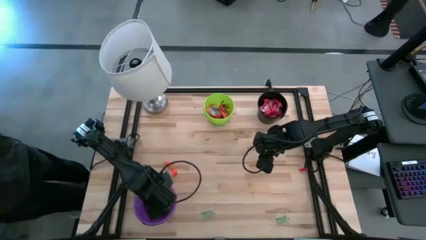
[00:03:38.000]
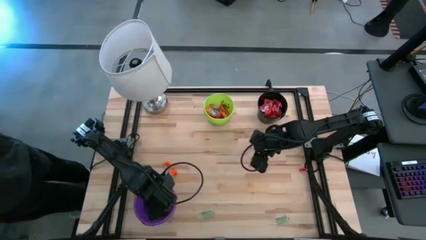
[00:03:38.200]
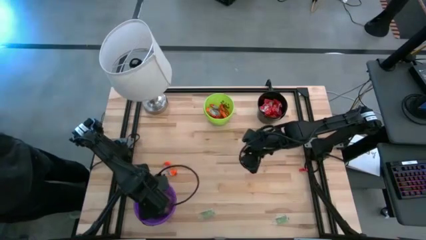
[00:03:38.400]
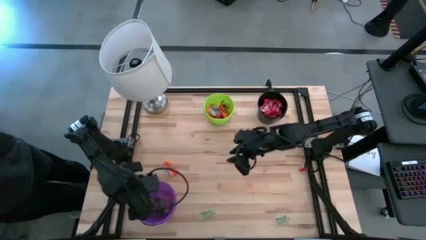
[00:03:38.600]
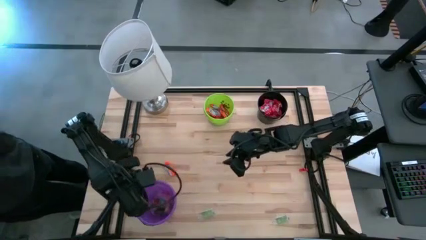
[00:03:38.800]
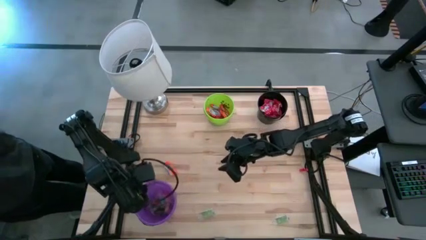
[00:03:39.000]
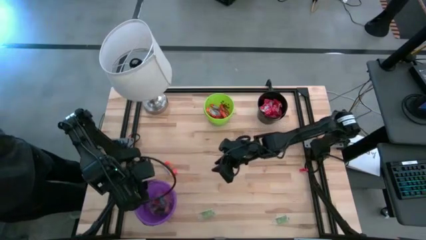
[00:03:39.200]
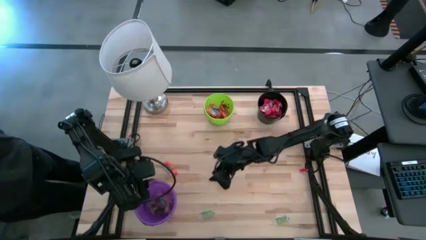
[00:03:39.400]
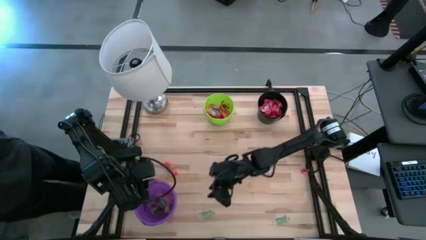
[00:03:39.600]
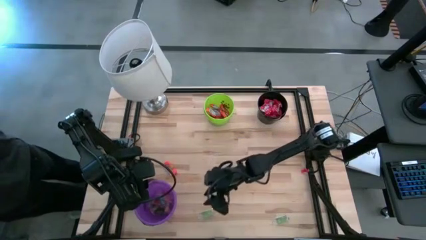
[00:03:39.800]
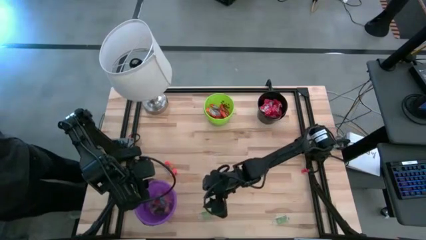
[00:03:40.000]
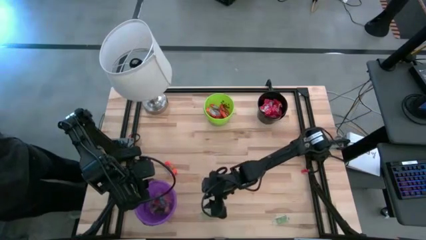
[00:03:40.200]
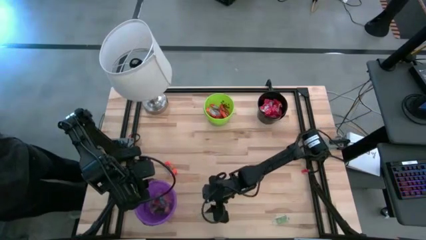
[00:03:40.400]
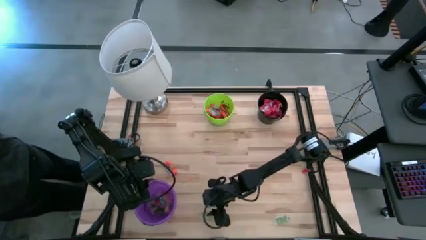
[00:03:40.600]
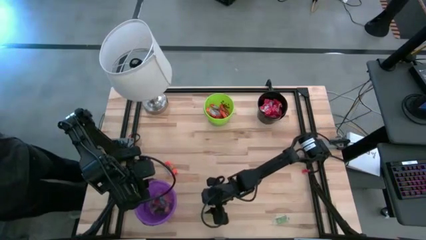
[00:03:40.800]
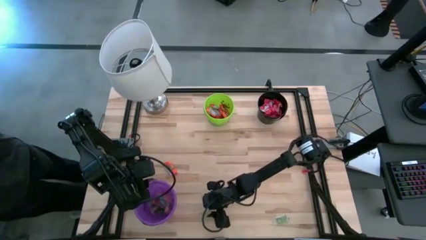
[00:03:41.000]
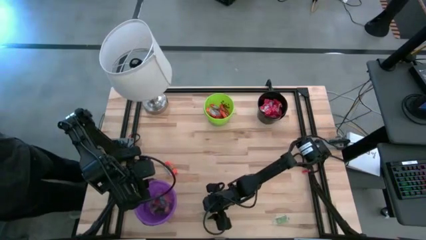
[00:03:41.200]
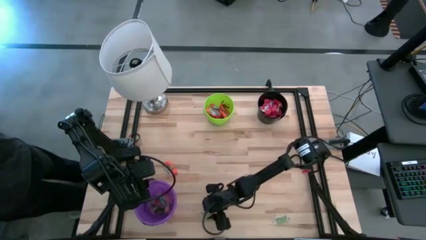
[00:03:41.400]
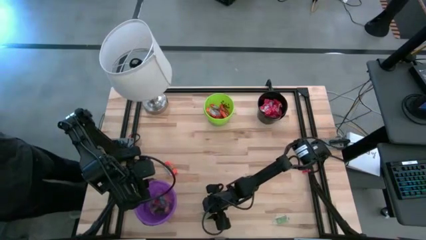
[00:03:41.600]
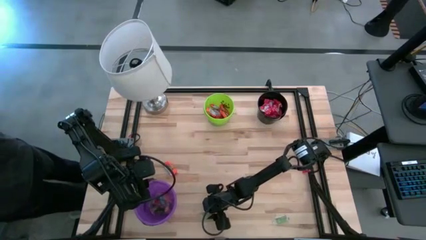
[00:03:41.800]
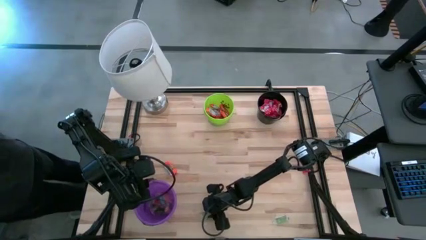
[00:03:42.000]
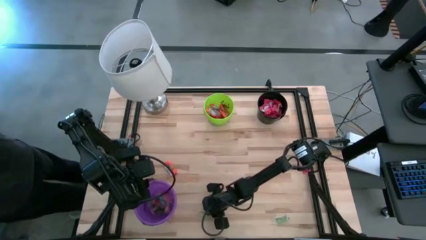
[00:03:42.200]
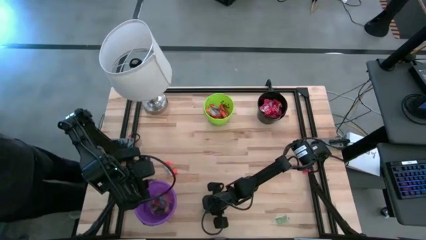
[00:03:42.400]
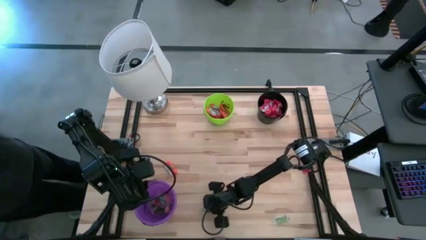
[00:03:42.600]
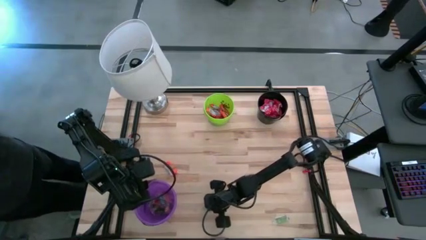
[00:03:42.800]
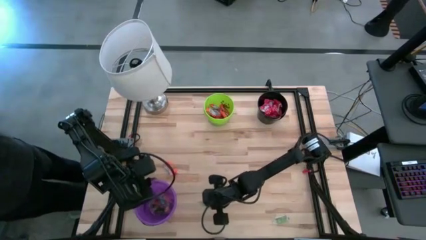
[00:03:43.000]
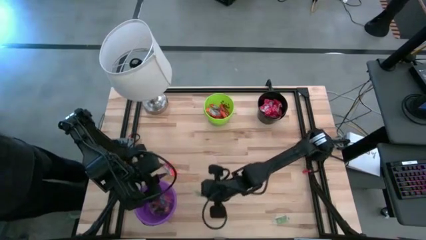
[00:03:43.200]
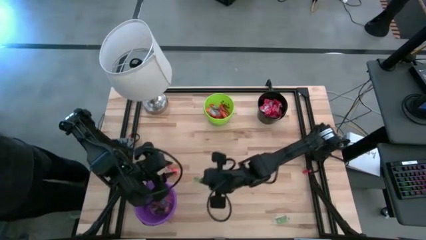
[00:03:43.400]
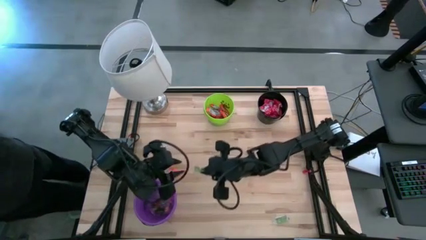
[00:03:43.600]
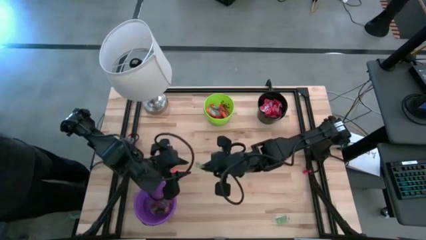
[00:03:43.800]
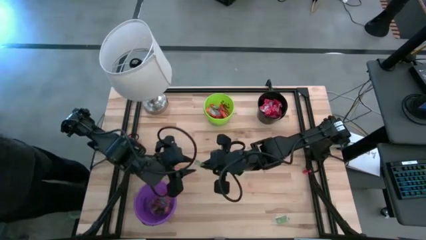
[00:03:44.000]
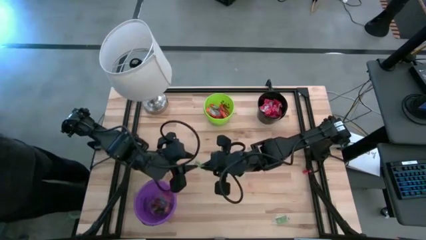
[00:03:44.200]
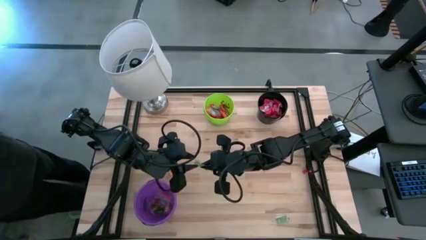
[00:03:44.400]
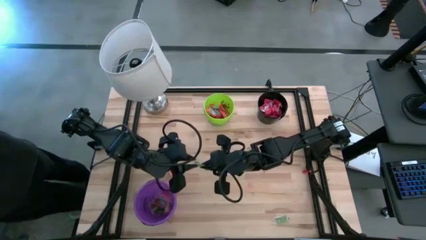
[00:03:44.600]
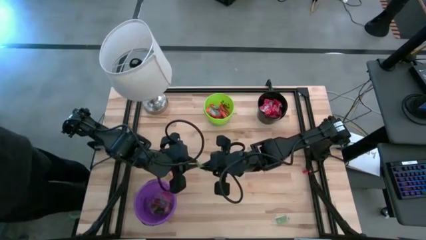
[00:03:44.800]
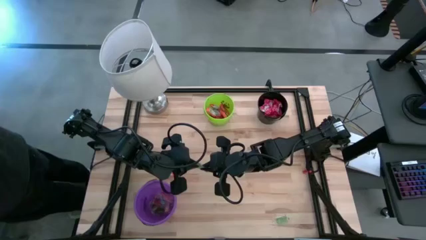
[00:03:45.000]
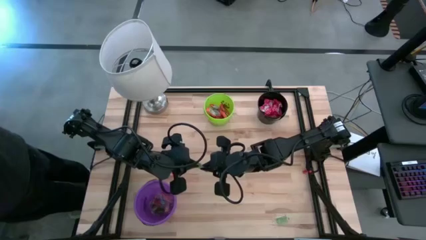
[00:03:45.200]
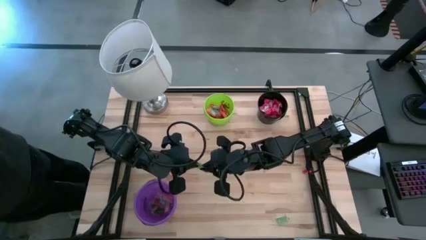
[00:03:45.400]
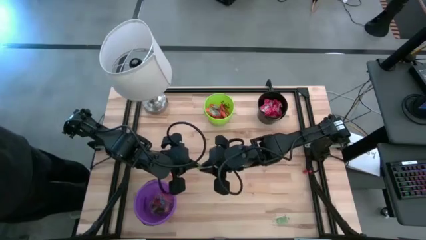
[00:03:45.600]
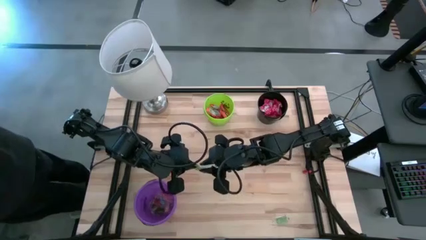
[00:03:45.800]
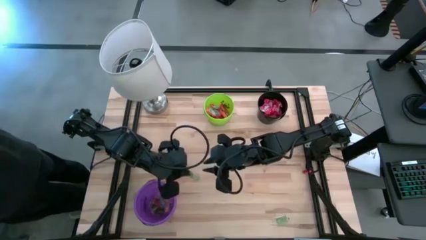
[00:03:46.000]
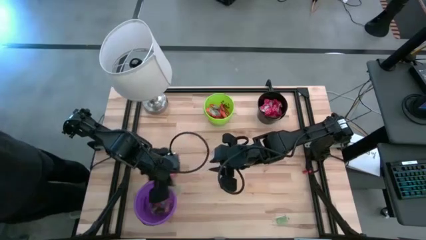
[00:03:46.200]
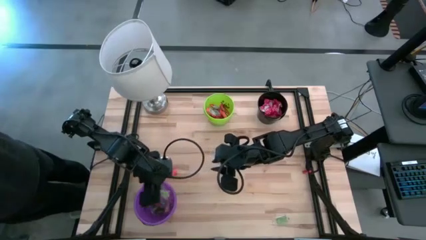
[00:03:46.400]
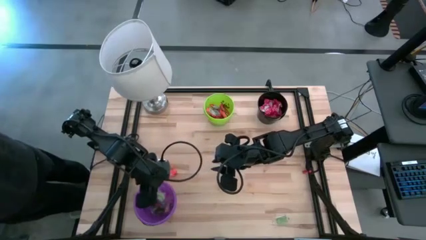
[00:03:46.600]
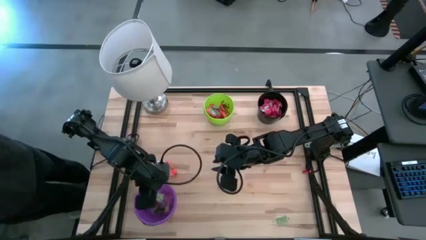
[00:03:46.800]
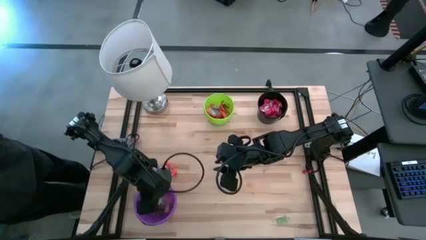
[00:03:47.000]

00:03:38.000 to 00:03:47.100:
Task: Sort candy
Put the green gummy into the violet bucket

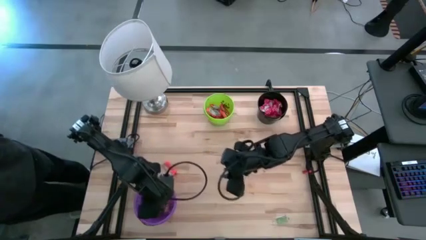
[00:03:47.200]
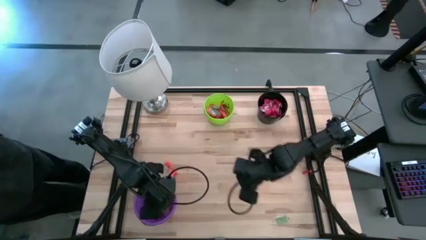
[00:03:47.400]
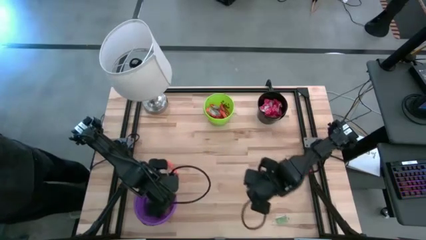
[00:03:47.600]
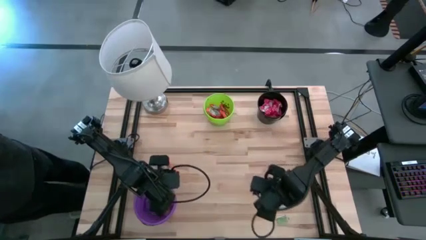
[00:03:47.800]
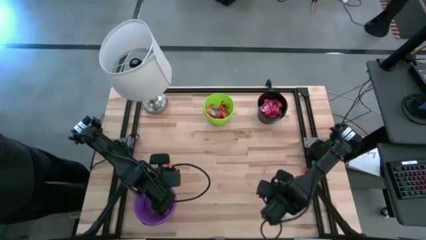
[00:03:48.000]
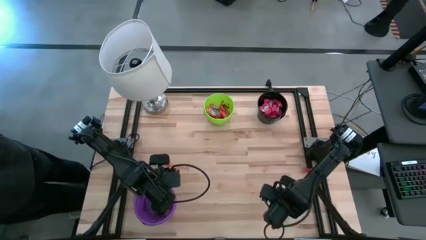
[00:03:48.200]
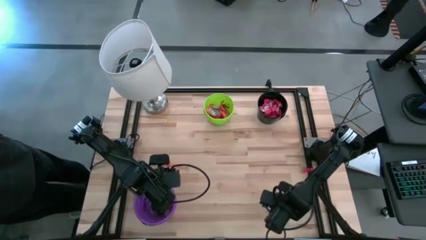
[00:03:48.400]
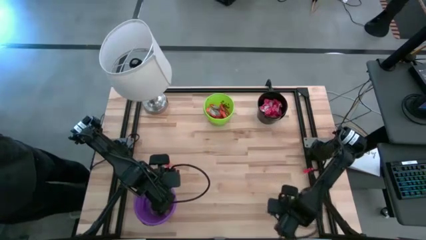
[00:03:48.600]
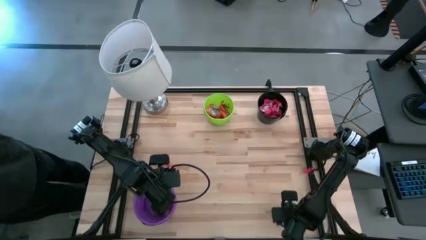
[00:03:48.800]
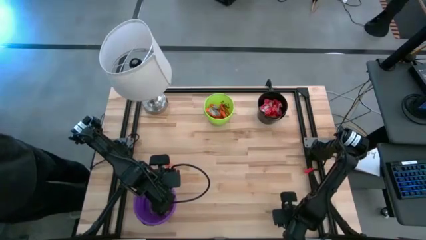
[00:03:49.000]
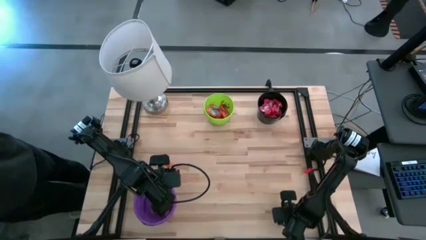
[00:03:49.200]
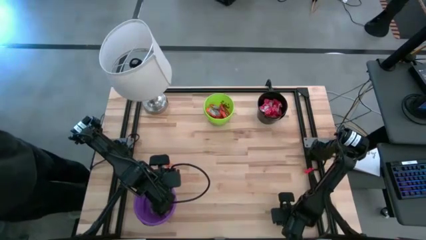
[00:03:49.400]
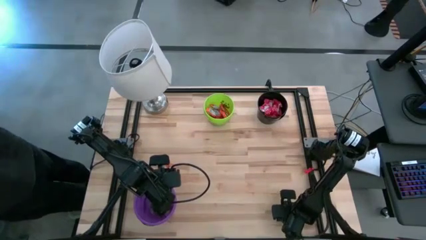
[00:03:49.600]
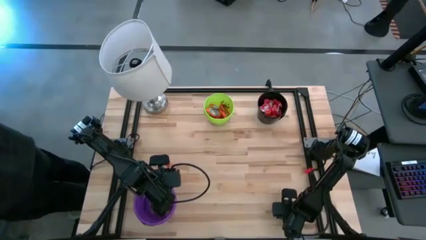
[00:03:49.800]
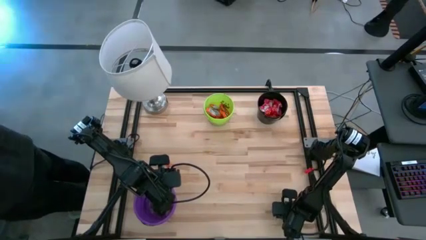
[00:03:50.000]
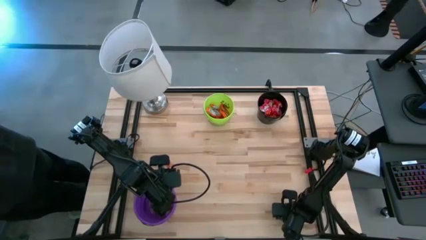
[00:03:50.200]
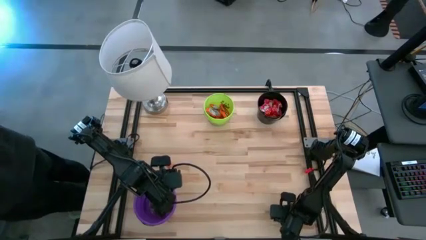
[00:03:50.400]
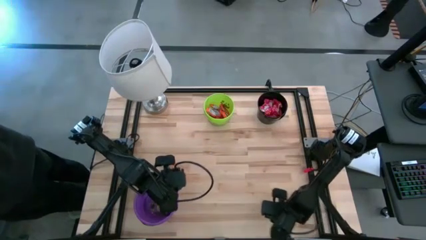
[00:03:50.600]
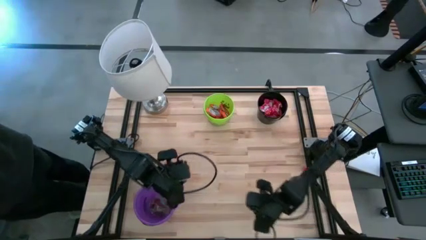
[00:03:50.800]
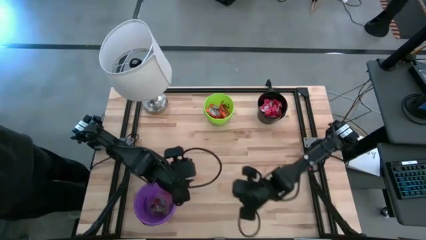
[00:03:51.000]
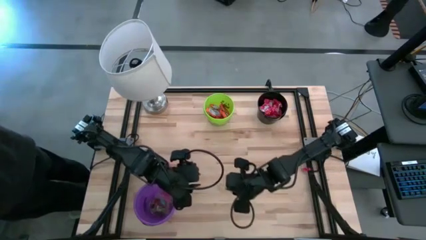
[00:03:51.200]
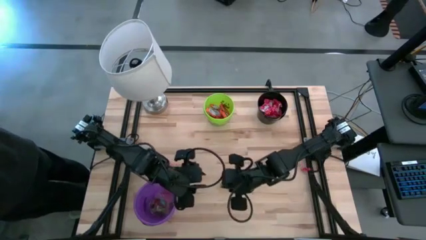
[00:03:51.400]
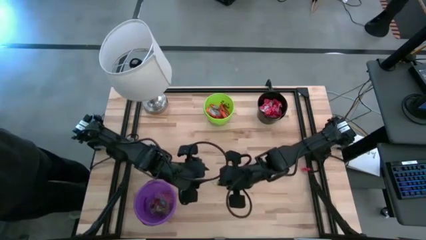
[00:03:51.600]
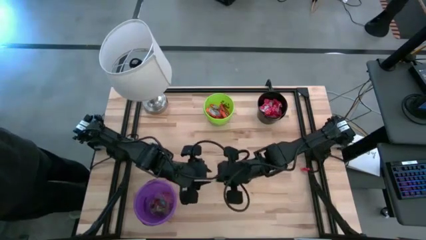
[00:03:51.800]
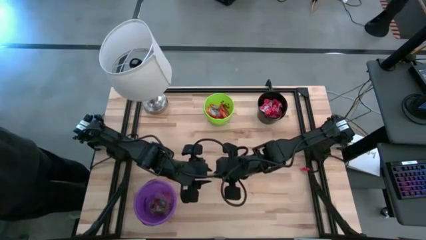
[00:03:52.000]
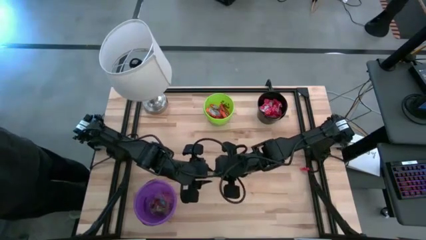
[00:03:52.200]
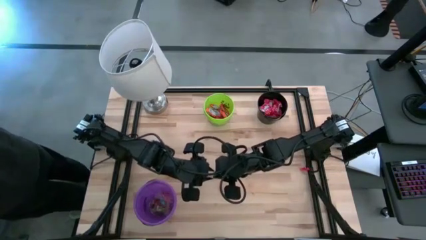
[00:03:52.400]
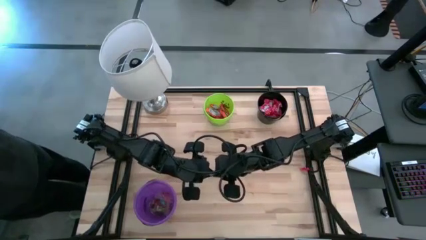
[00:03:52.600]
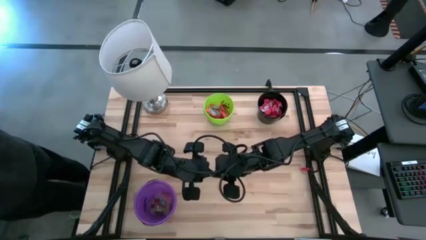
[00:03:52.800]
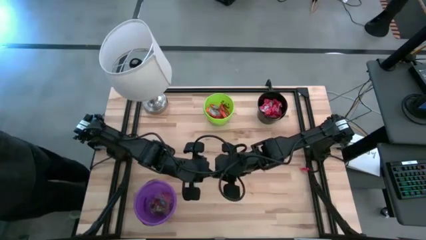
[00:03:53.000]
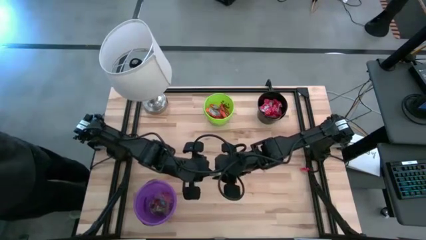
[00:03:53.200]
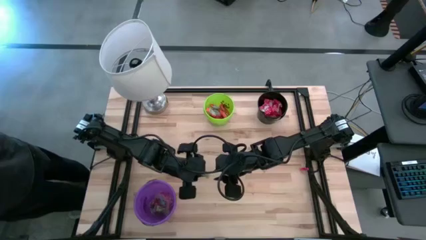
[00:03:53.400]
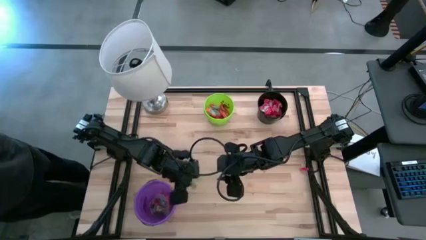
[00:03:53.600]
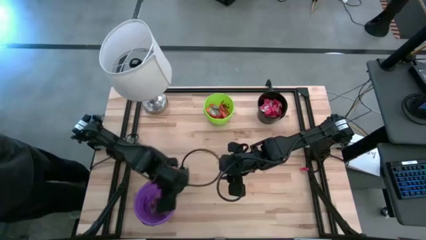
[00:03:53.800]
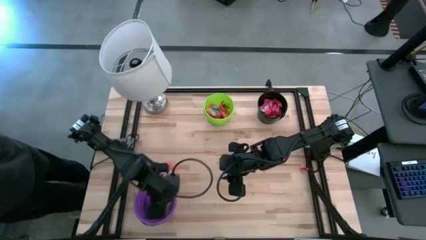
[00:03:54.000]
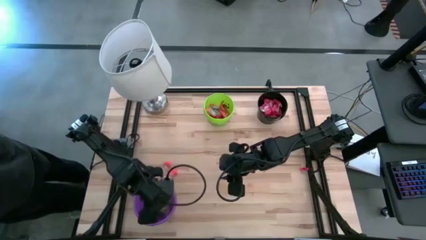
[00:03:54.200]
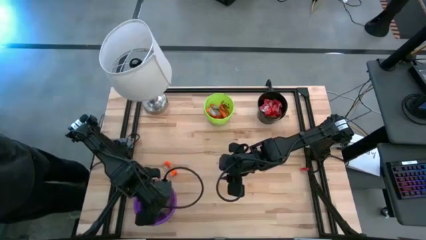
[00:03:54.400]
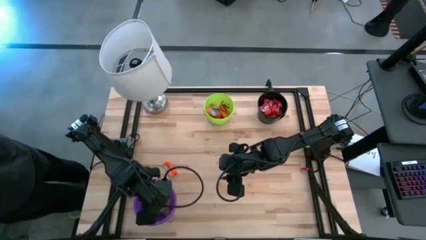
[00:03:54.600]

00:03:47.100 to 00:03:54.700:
Put the green gummy into the violet bucket
